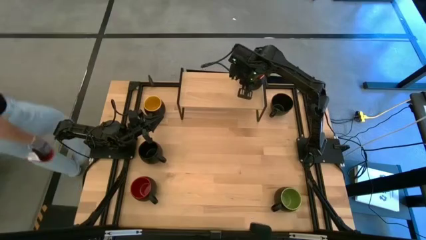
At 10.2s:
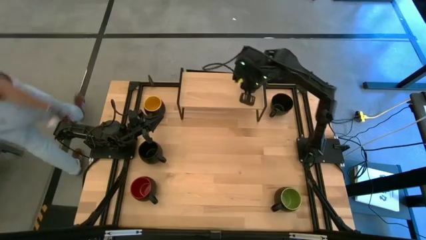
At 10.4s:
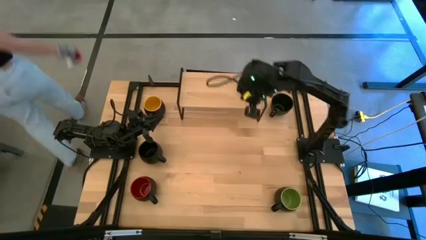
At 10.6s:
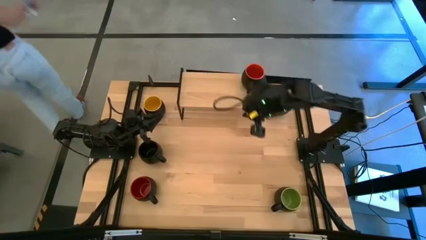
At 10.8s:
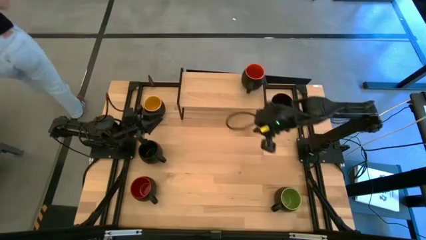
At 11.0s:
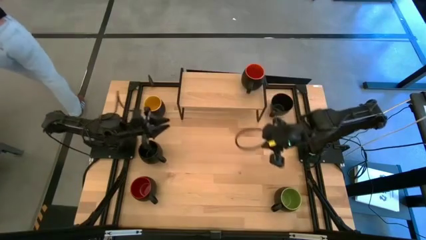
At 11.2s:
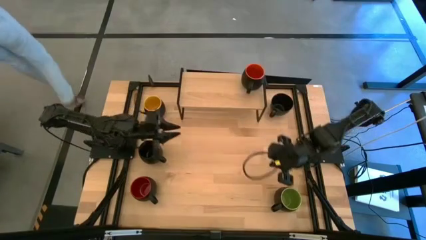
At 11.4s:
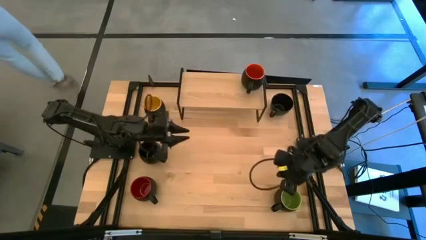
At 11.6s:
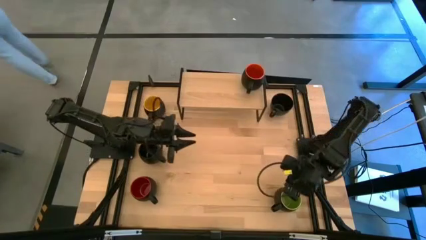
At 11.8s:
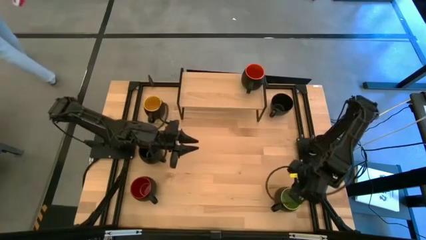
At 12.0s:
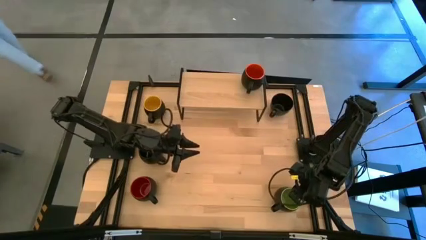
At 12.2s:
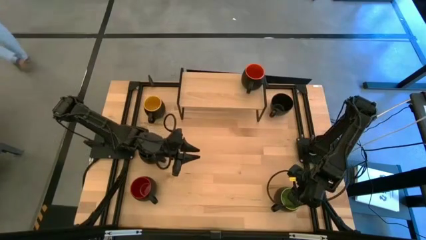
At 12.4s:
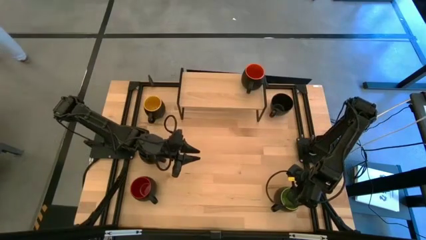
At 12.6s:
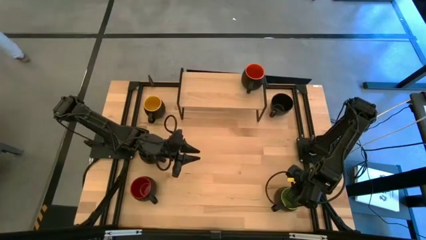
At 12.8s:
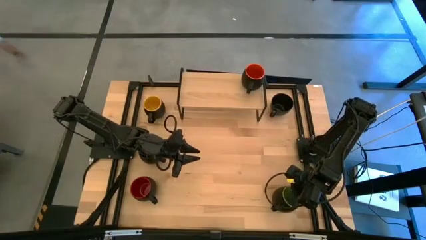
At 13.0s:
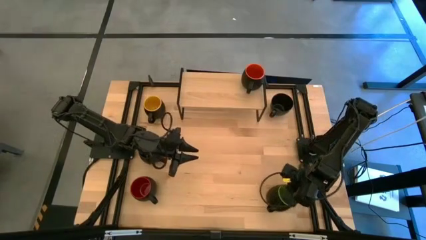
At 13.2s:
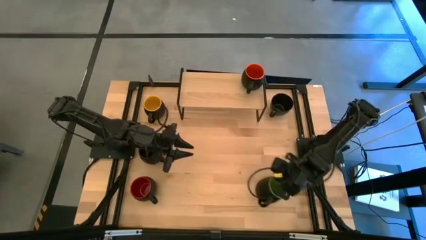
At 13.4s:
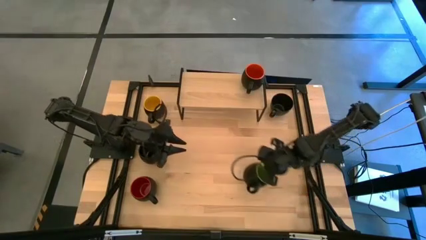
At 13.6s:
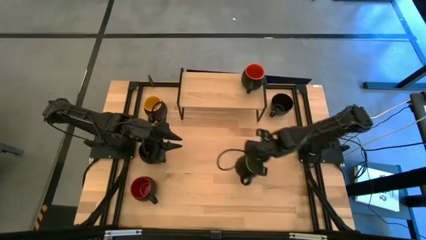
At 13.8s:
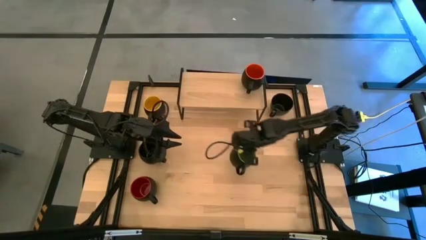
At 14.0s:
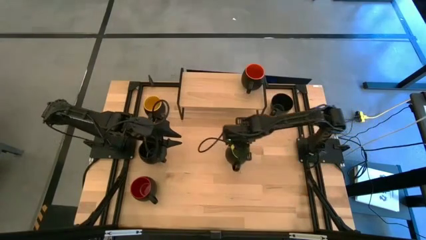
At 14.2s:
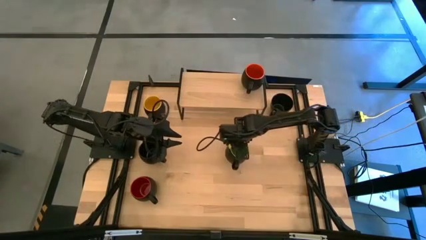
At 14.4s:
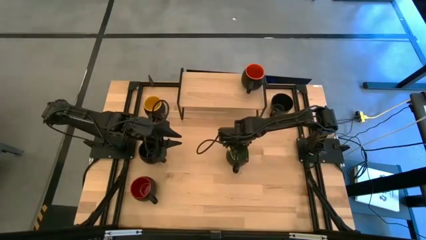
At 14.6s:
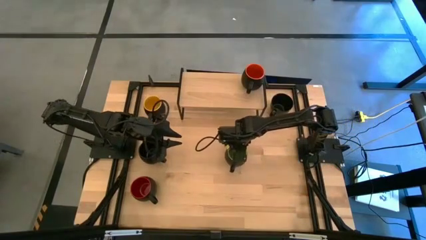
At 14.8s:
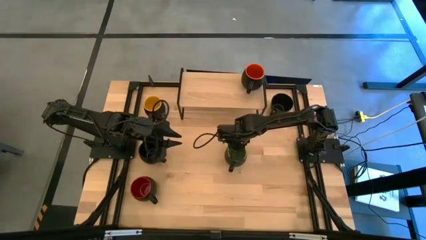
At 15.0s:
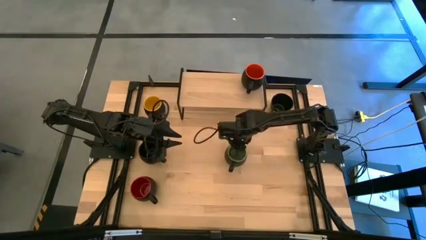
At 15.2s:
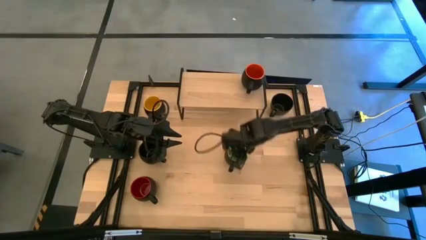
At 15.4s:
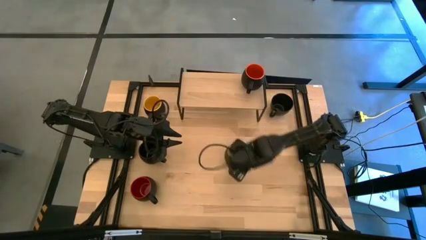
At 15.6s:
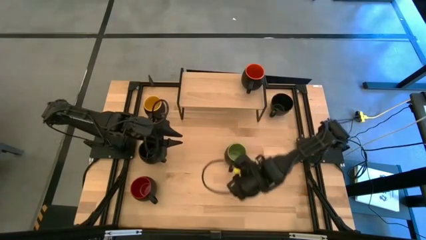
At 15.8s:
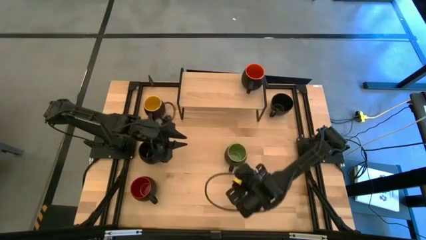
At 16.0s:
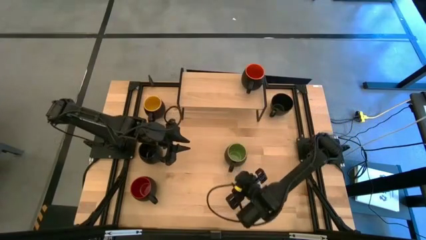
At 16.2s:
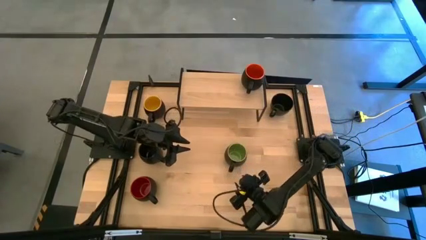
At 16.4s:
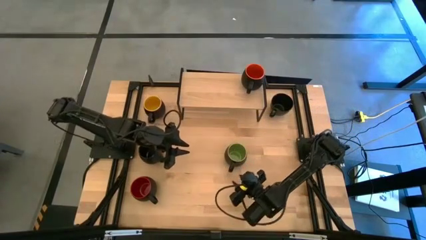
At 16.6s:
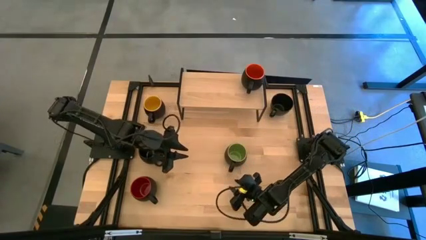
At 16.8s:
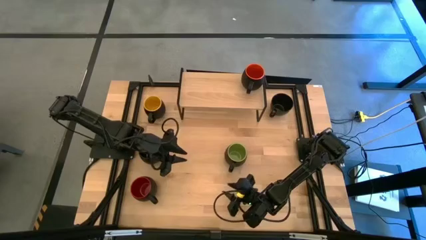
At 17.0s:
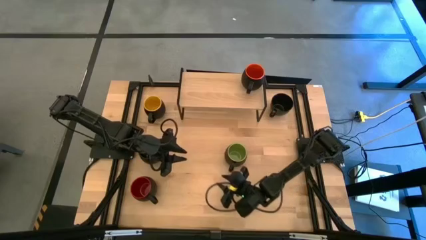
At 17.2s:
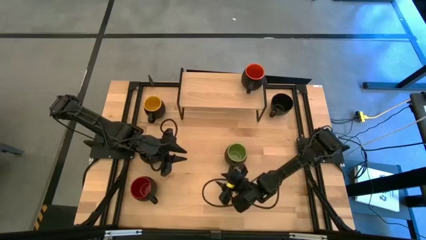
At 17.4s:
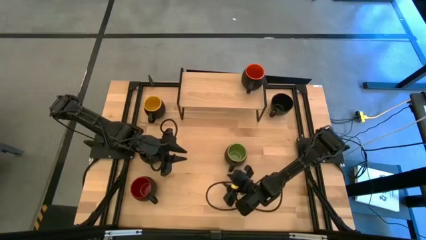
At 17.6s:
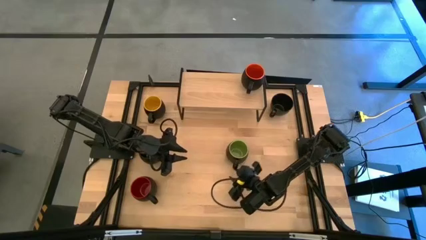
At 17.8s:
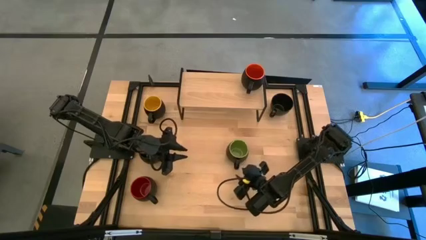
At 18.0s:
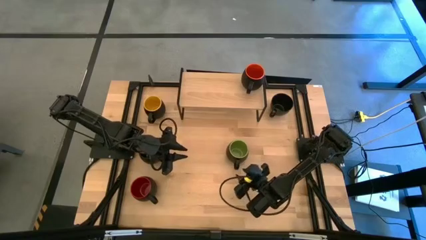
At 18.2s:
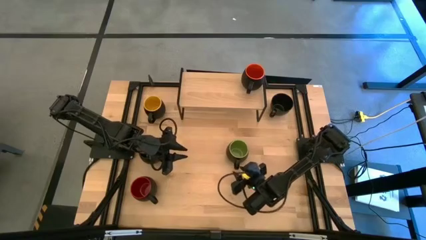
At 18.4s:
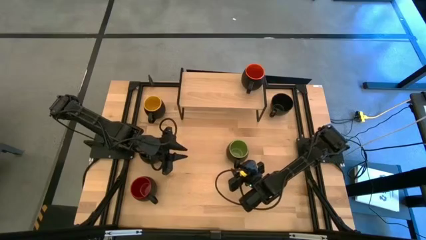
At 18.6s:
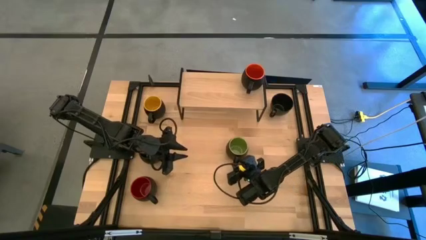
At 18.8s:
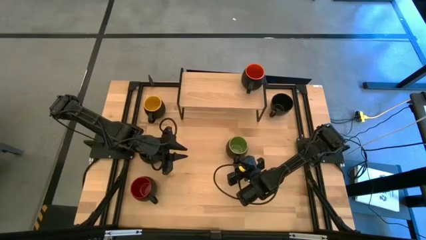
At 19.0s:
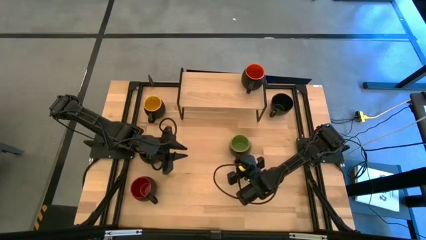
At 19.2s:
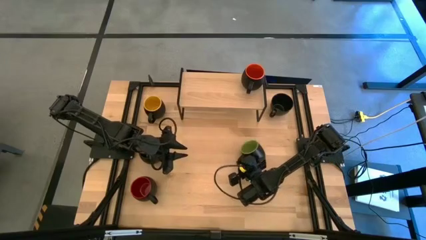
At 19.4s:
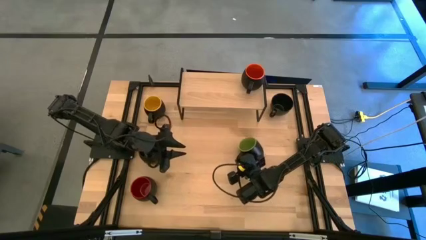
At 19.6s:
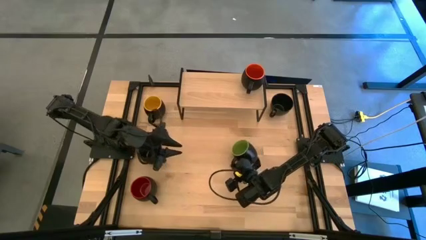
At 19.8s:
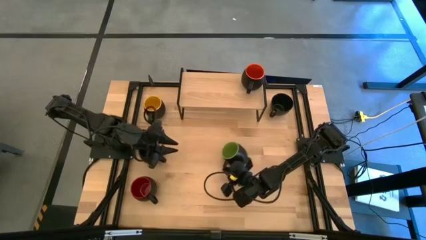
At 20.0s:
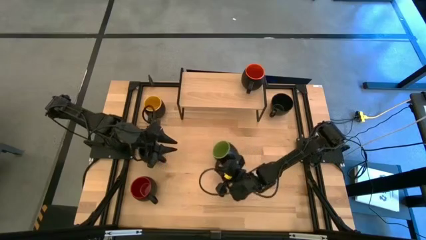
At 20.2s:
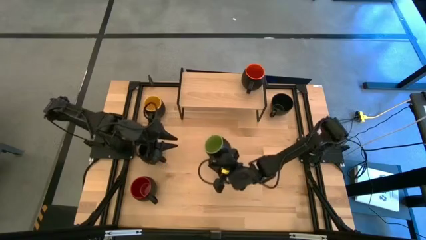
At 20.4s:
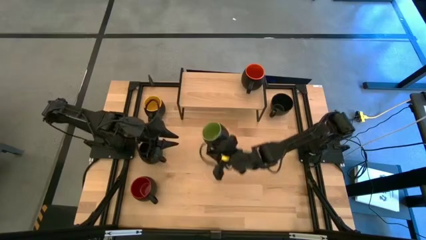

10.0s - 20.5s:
Task: Place coffee mugs
Put the green mug on the shelf

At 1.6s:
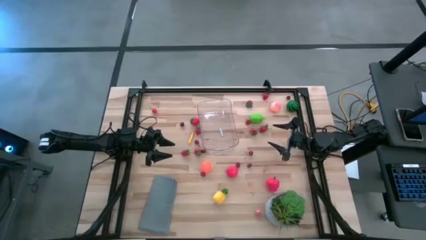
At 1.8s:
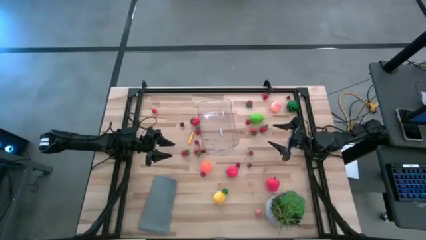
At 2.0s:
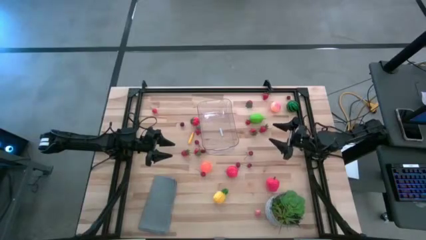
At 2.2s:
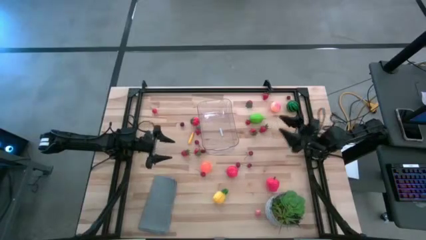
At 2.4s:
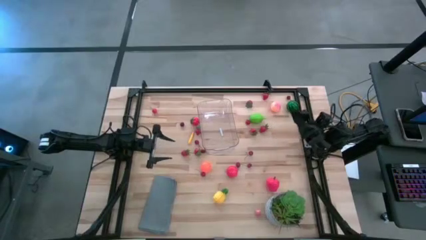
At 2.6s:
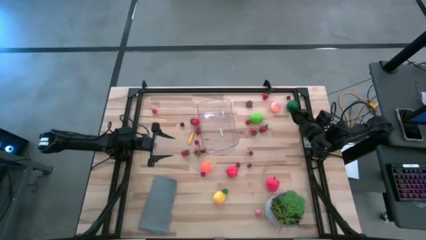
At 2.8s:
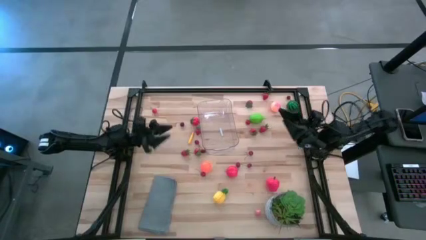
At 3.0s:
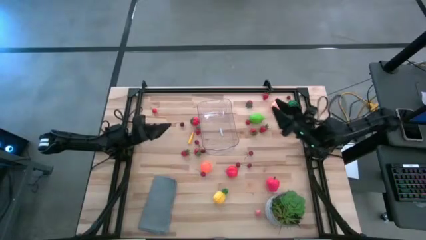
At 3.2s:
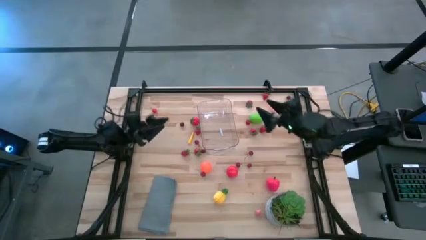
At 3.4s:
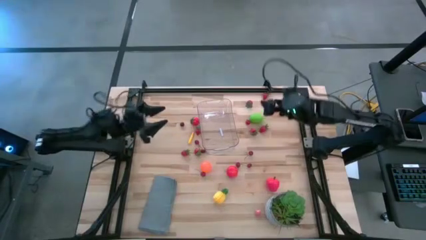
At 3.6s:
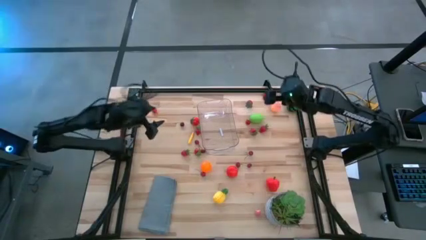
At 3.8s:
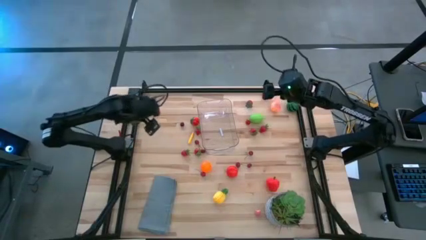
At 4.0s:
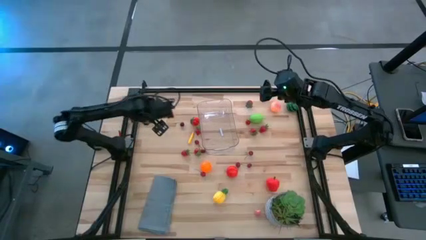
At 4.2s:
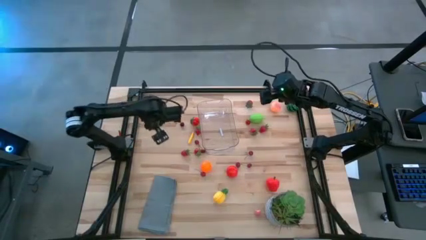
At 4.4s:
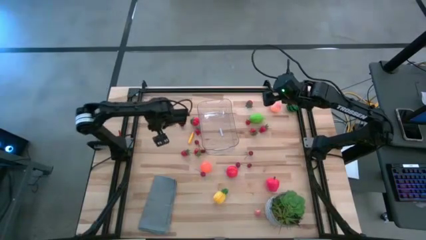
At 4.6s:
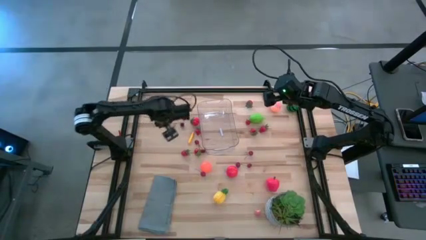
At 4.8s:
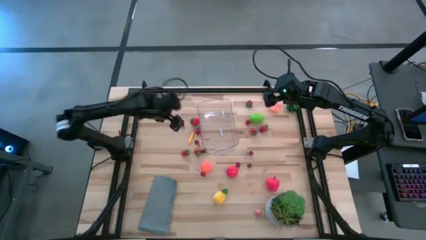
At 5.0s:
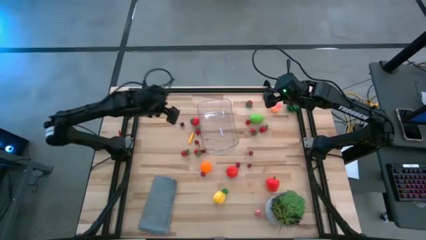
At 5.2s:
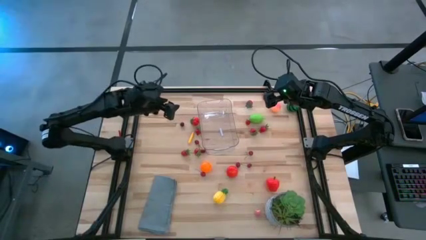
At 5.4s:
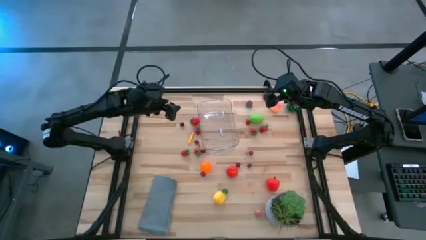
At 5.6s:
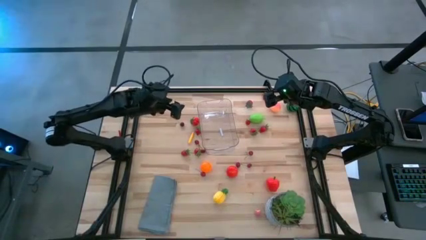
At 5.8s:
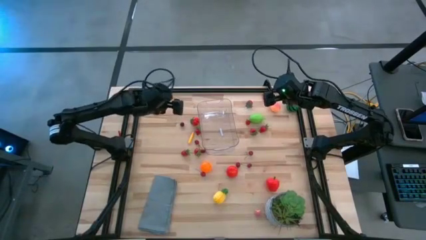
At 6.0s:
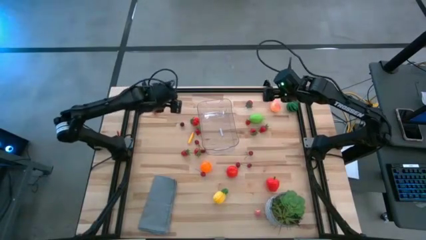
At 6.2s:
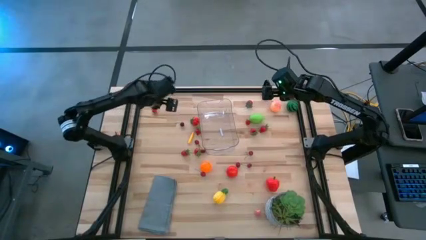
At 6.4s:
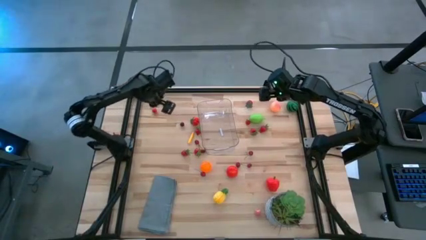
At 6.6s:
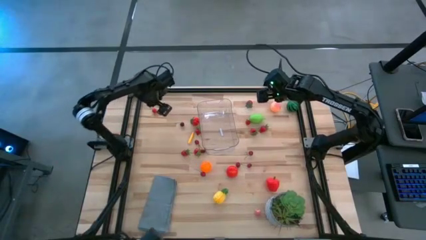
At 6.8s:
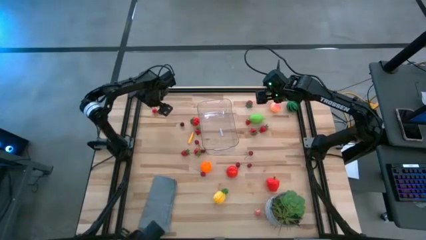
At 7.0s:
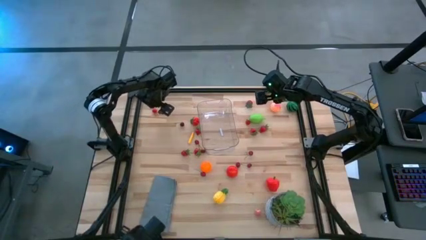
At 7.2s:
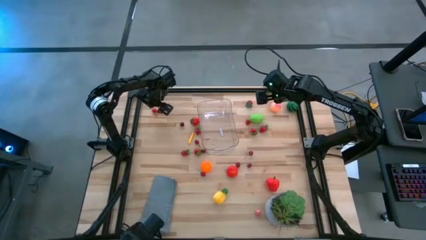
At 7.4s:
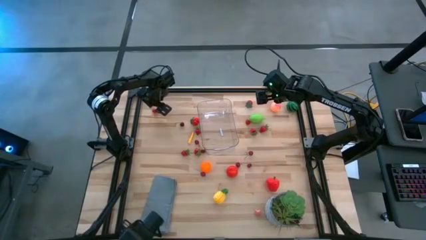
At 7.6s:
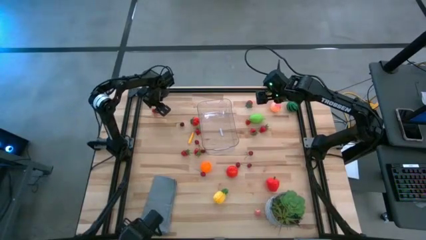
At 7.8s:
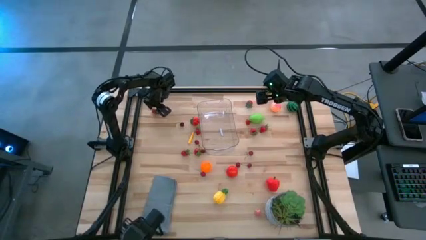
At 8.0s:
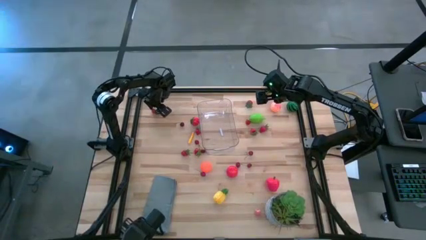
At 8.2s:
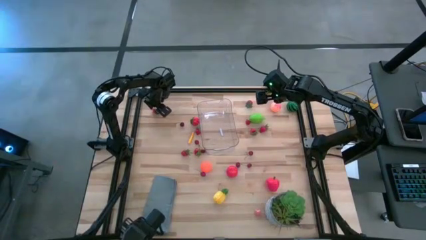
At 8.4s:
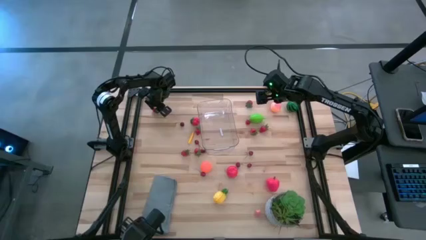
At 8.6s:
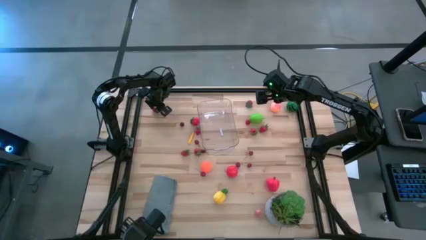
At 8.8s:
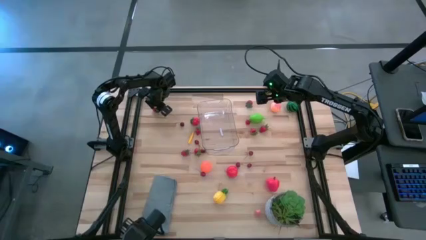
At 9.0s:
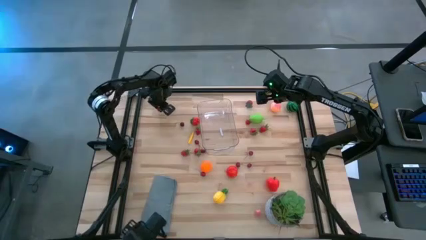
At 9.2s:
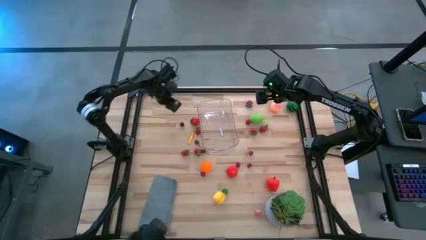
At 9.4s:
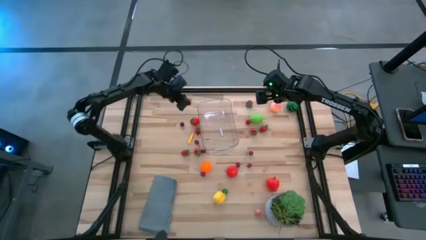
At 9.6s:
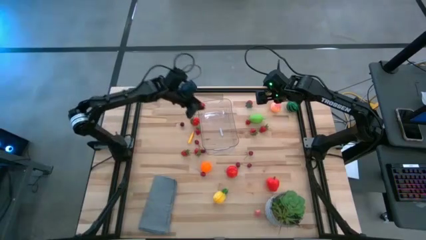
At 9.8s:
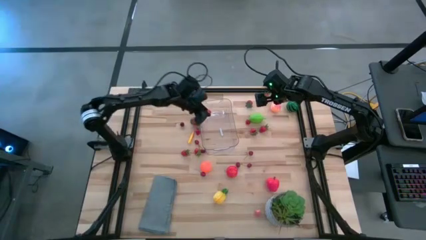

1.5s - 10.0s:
Task: Pick and placing Produce into tupperware
Put the red cherry into the transparent container
